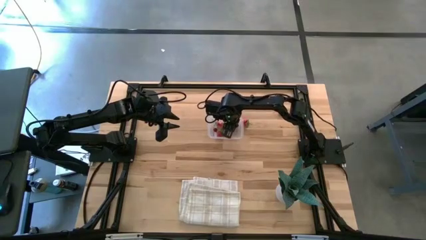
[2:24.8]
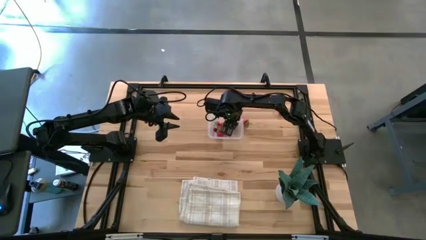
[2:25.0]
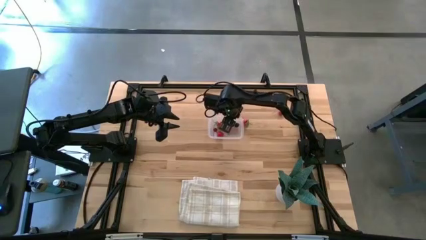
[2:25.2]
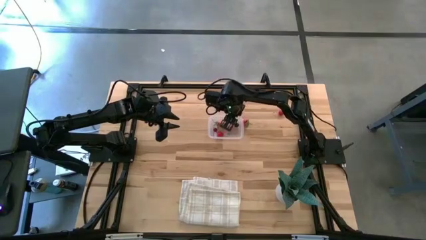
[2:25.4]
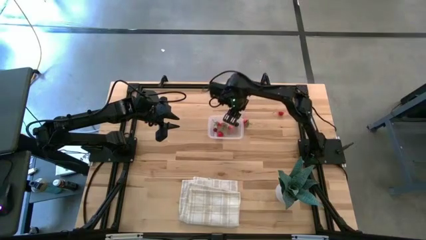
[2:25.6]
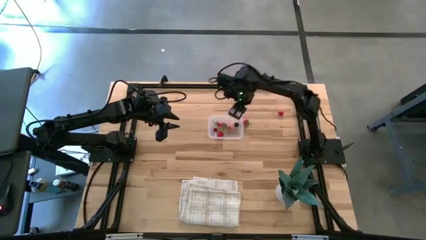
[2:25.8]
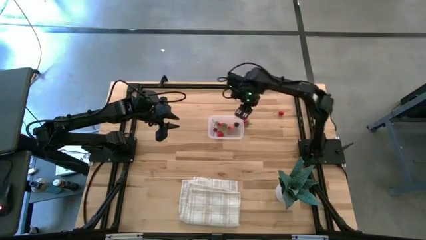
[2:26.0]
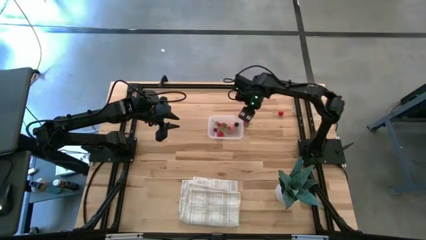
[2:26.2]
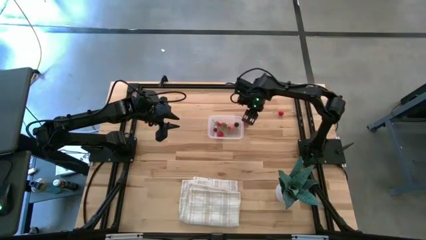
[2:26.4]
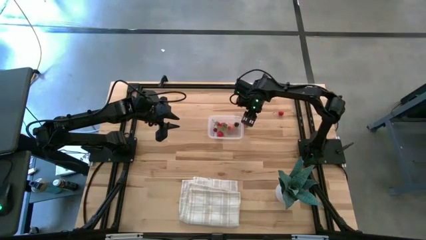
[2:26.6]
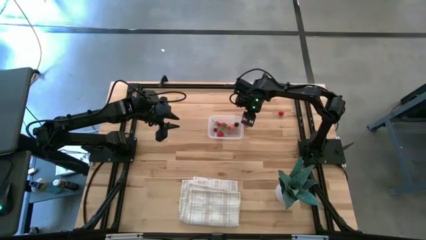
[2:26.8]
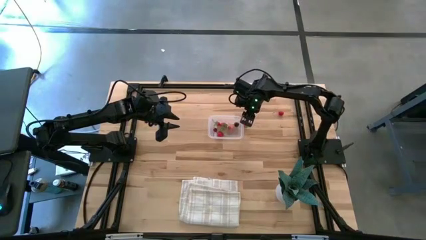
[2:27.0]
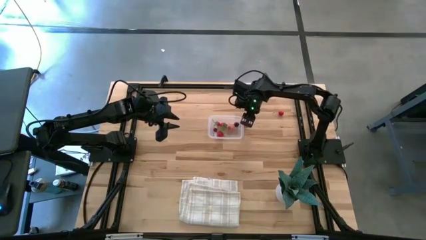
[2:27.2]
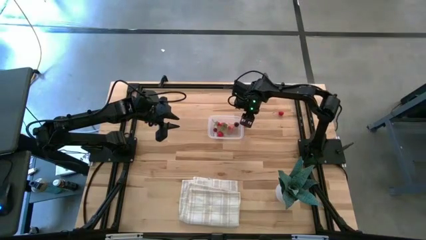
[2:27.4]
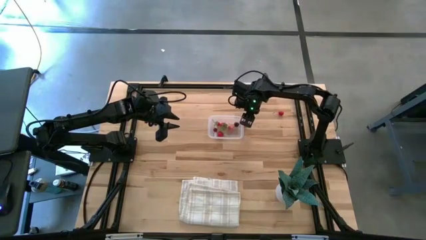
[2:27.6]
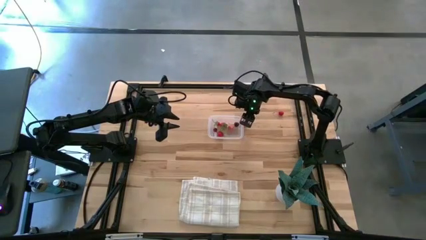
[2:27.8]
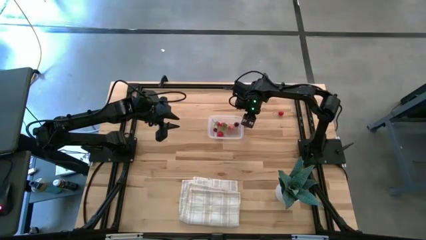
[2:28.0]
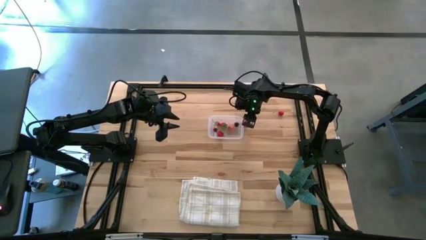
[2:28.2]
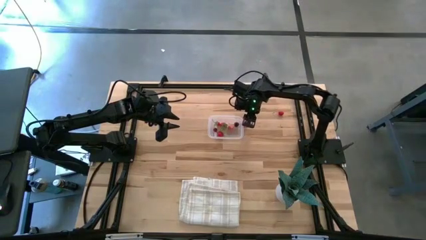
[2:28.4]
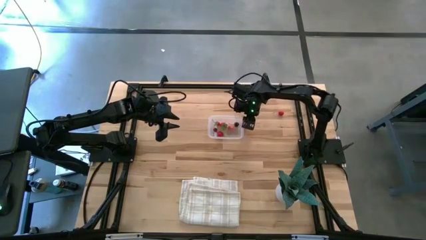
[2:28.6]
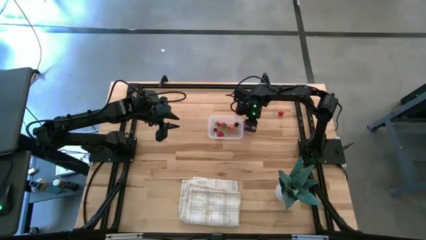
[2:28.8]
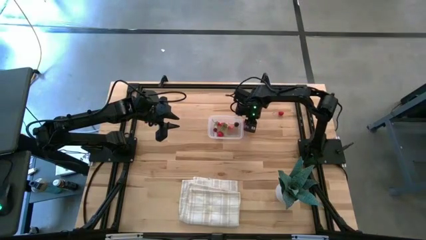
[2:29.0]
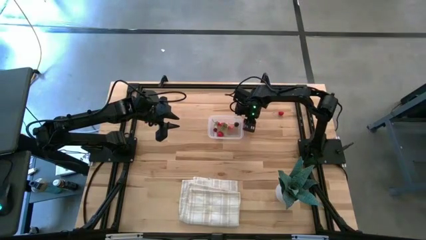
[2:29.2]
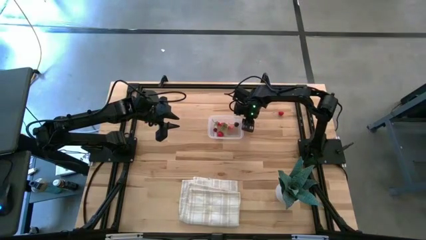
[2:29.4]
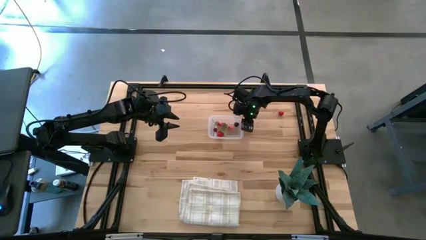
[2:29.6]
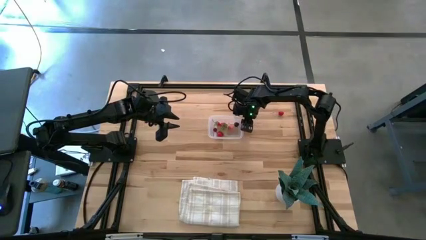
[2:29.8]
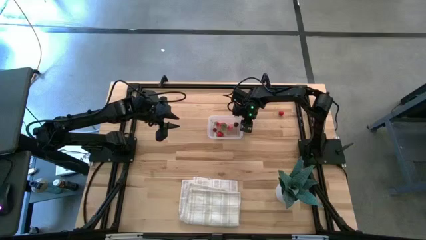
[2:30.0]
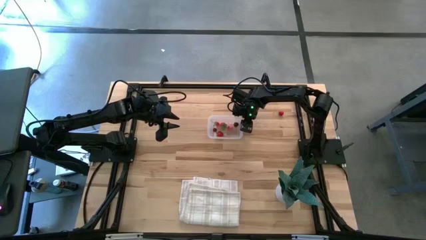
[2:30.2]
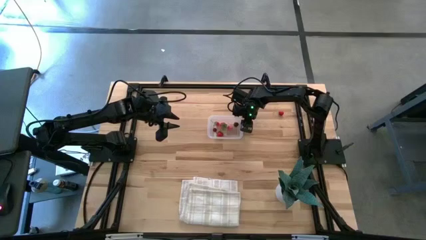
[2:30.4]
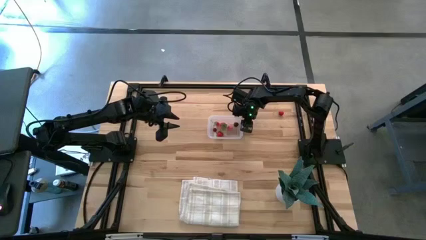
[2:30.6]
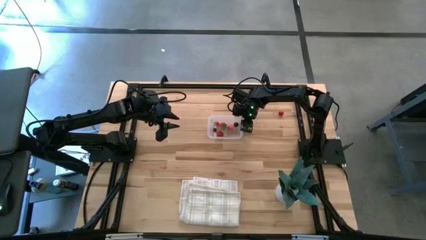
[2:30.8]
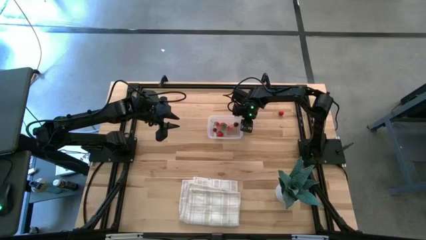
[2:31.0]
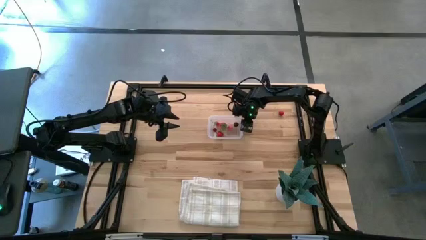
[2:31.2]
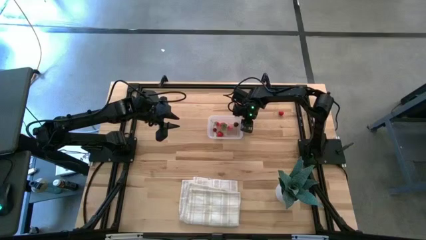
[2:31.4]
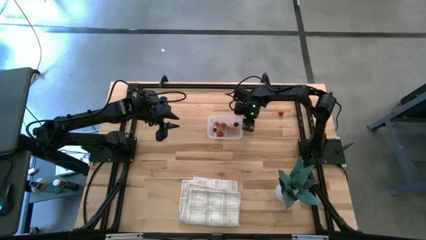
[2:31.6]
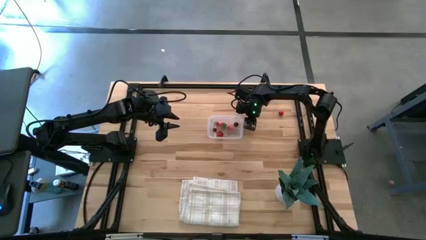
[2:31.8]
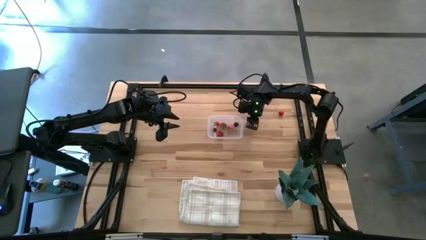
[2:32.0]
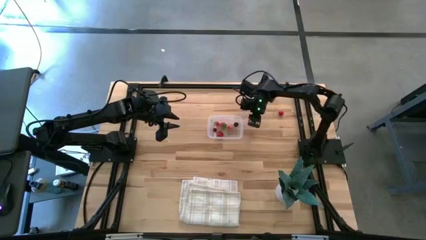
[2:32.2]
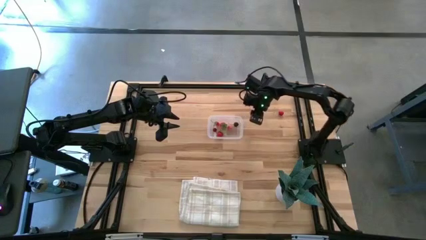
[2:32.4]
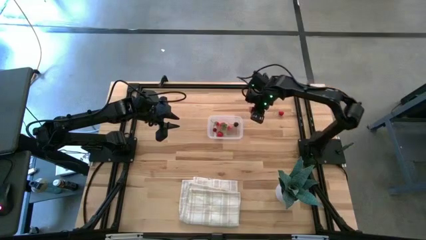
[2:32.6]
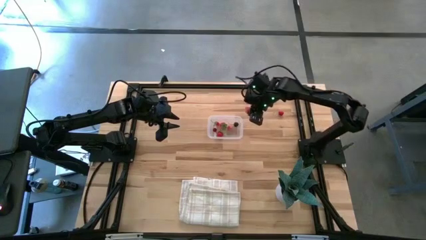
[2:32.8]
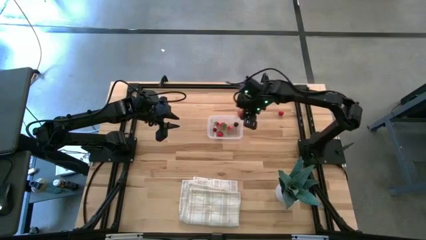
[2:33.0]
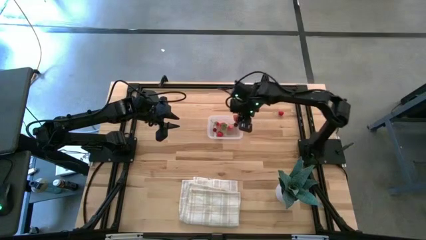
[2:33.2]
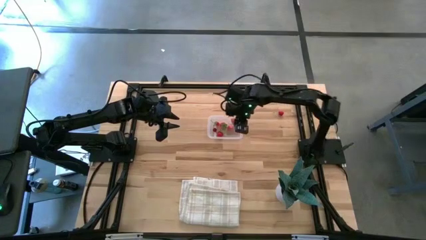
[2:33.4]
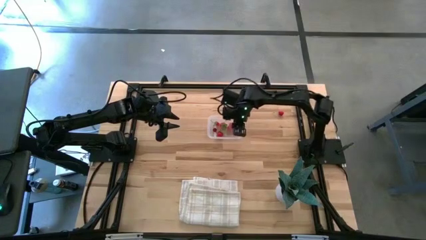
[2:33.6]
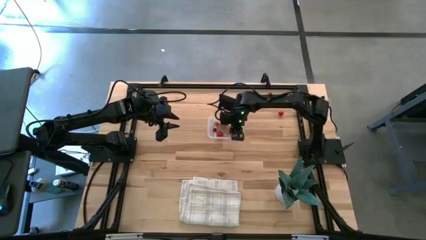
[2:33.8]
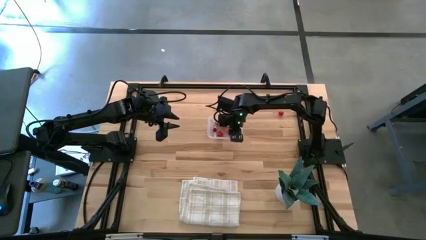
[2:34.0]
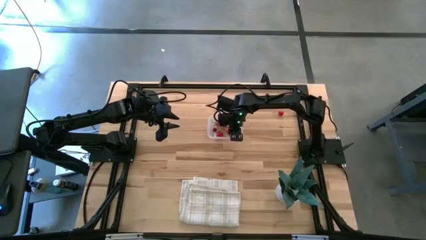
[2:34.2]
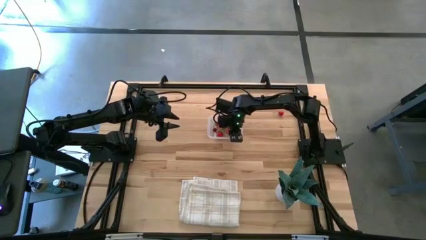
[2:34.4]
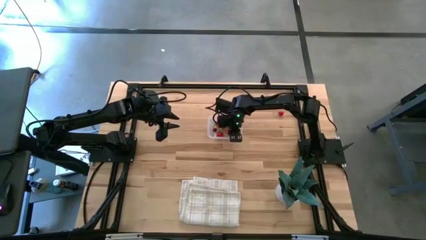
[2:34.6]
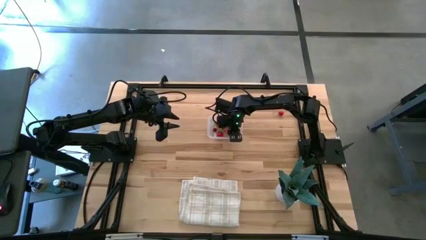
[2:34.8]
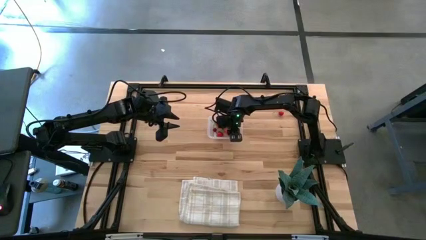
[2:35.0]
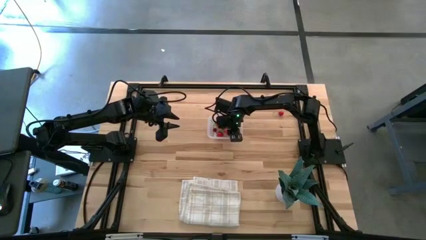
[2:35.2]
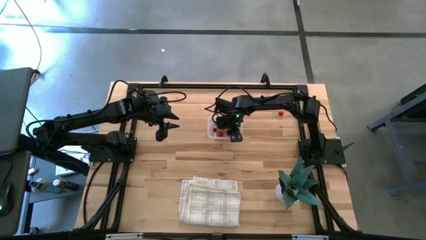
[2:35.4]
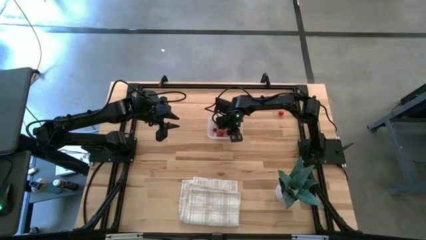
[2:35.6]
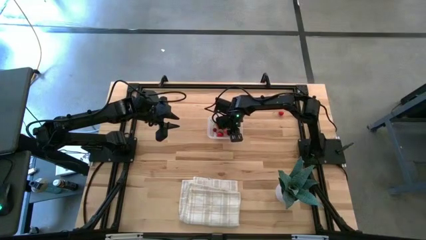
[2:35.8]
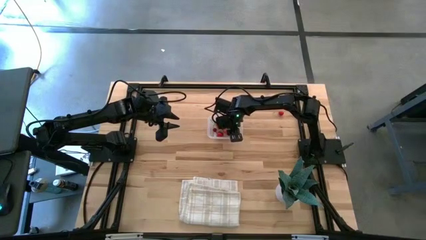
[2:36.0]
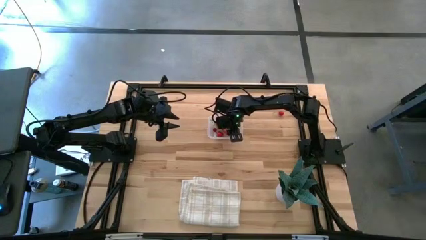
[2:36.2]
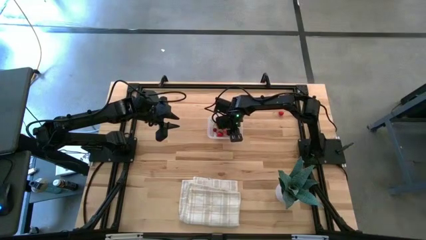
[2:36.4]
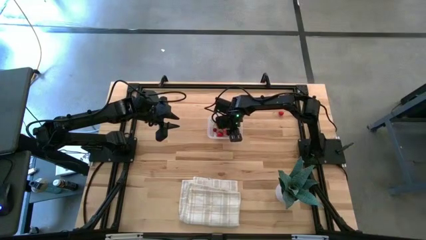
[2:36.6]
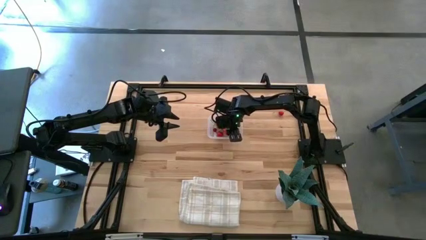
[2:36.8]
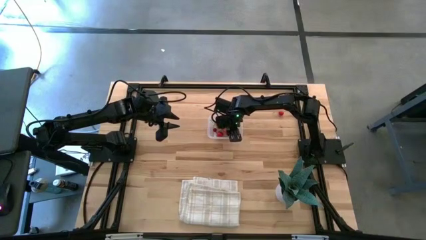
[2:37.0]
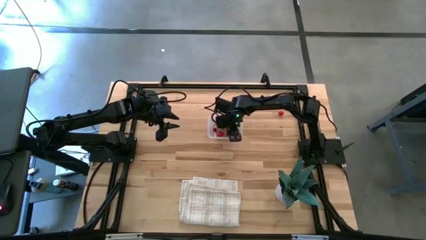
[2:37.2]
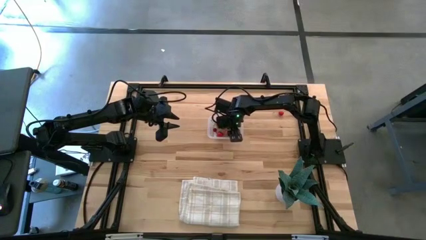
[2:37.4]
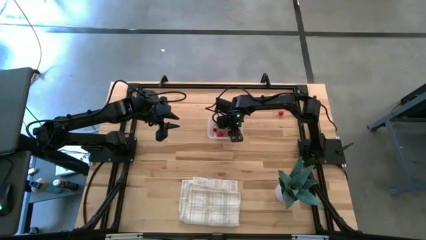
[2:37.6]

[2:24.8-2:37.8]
Task: Pick and placing Produce into tupperware
Put the strawberry into the transparent bin
